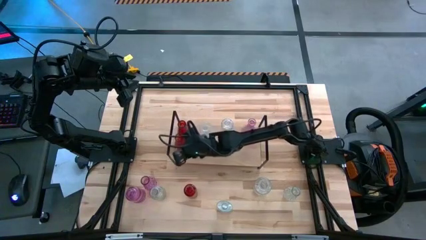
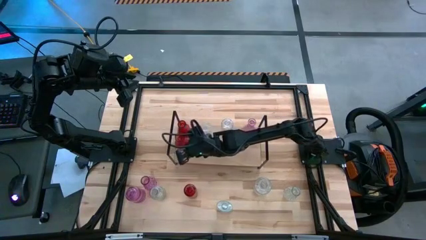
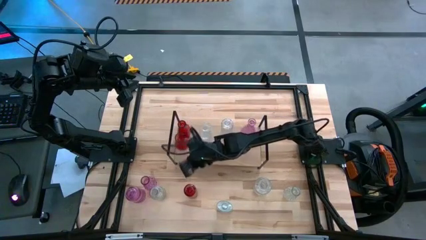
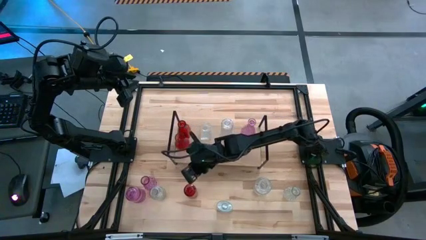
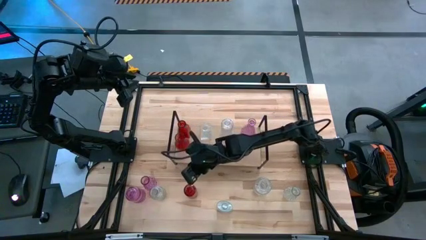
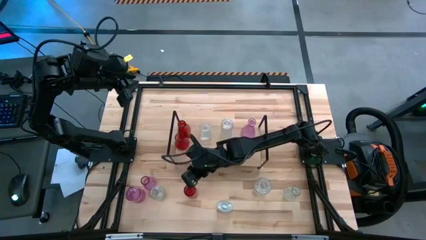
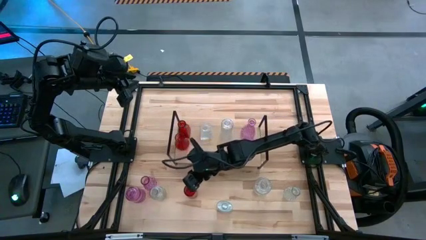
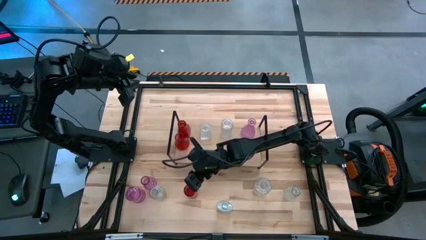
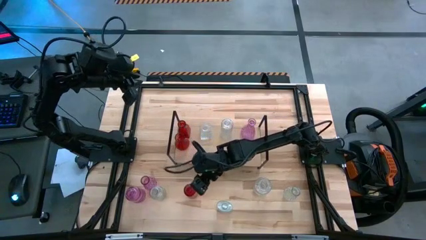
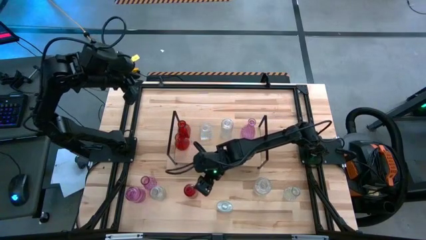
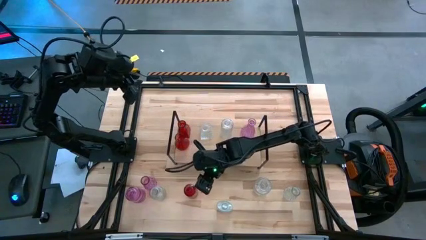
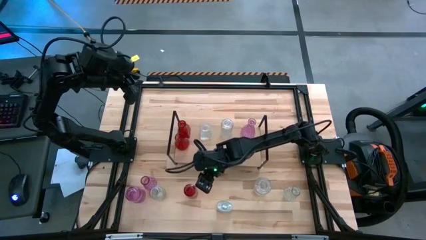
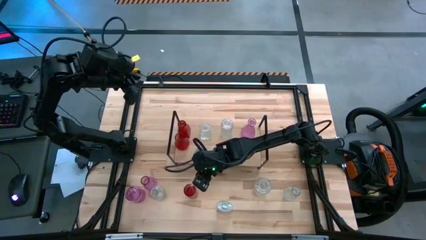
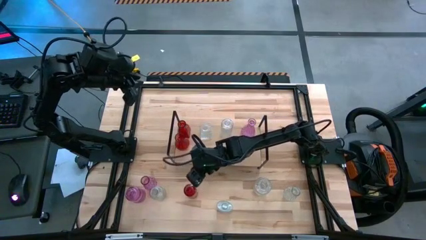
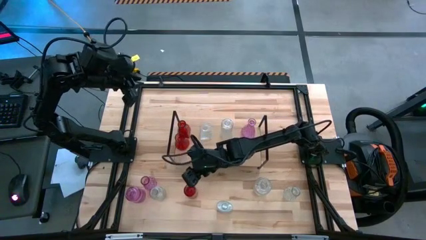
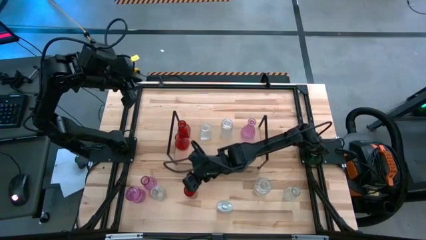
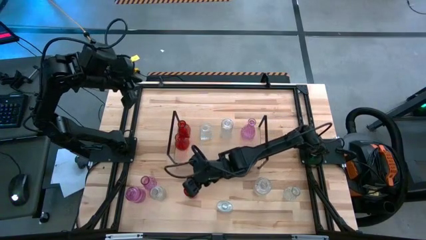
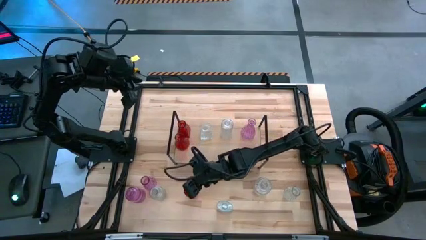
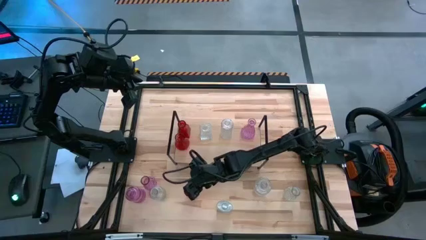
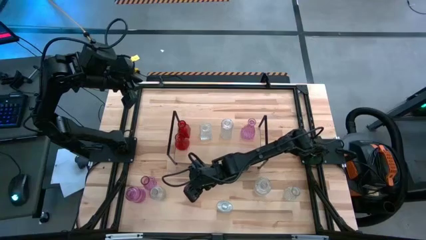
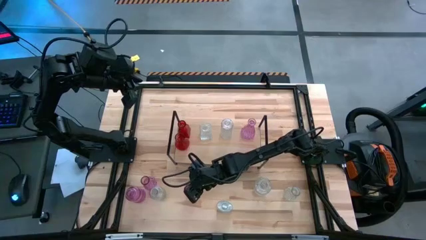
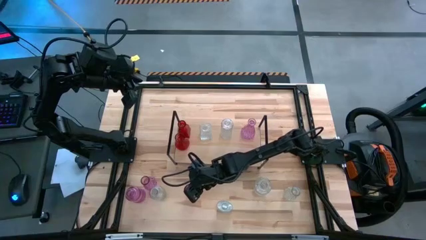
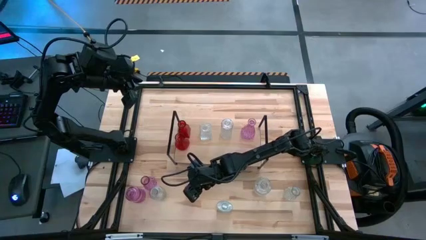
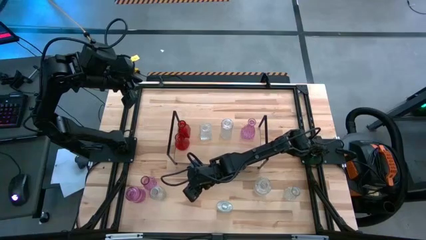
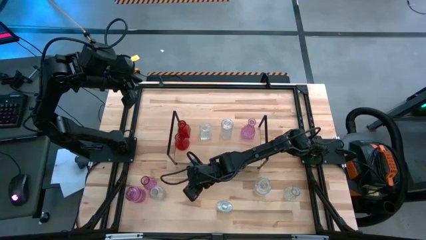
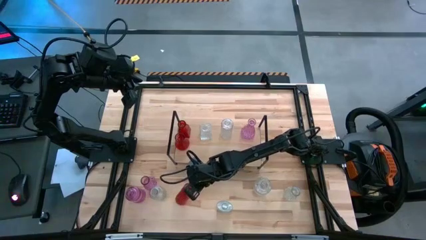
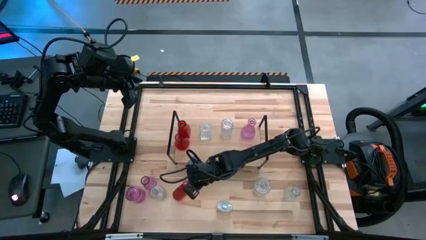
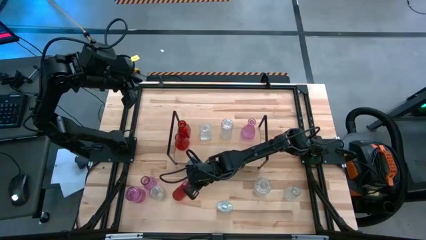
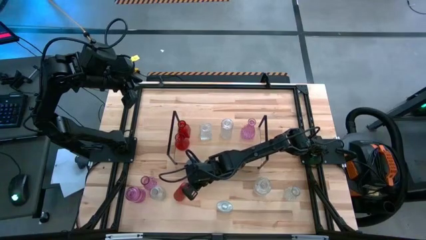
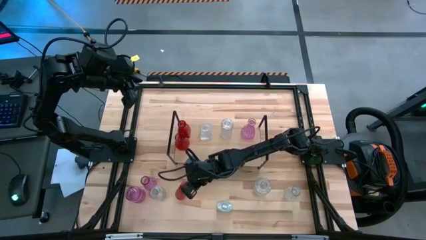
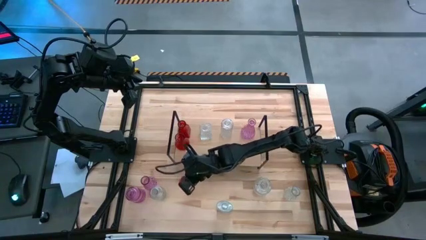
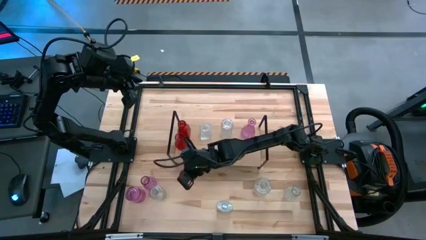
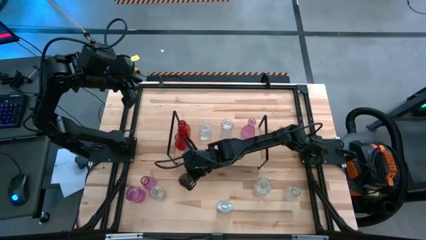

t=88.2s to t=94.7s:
Task: sort vases onto shelf
Put the red vase aligned with the other red vase on the shelf

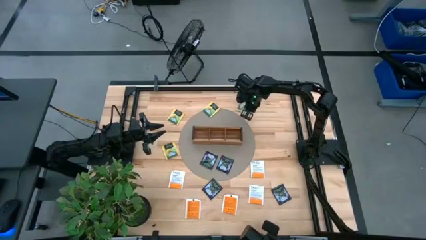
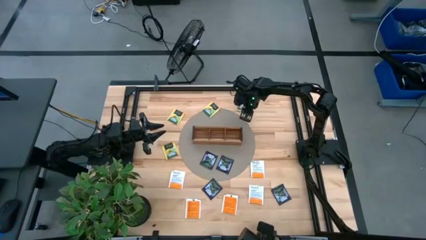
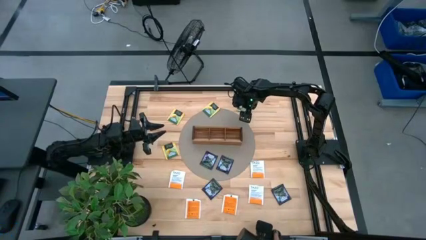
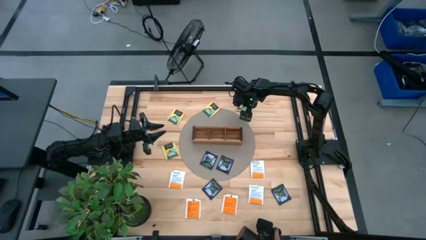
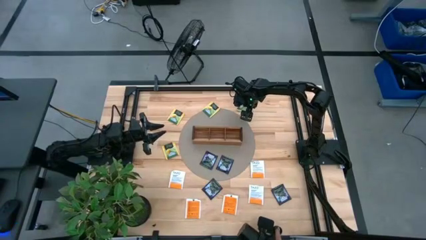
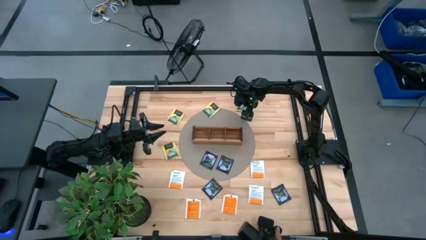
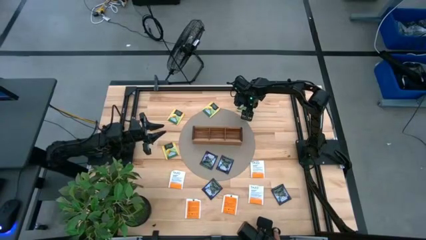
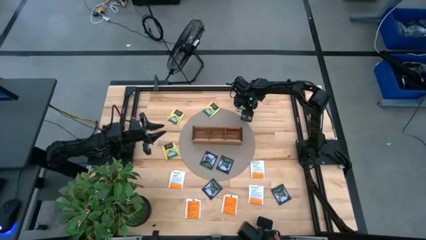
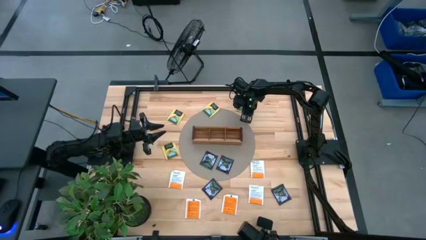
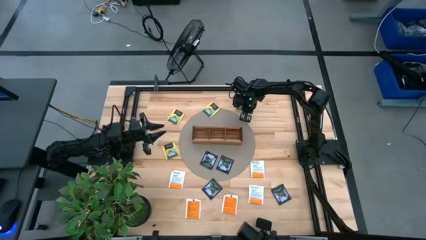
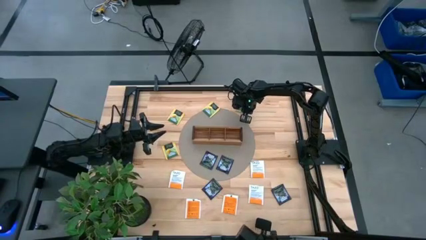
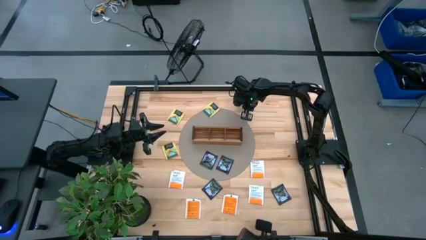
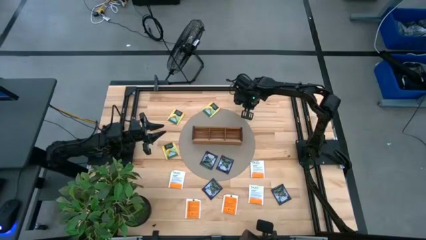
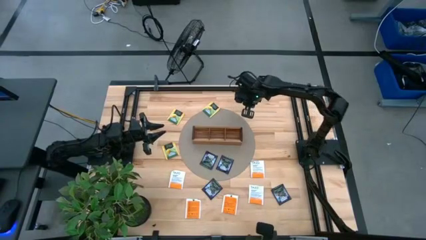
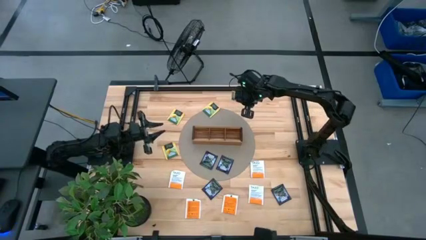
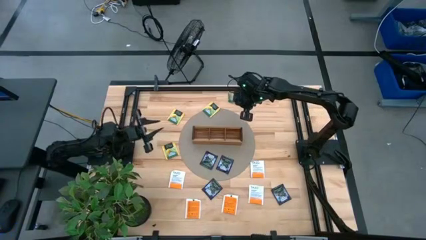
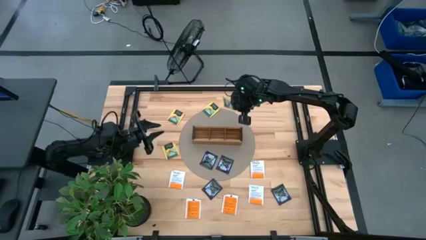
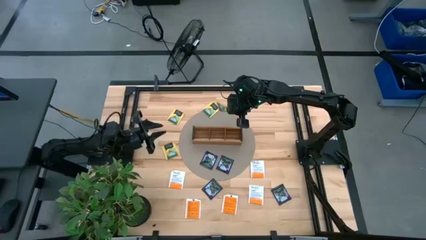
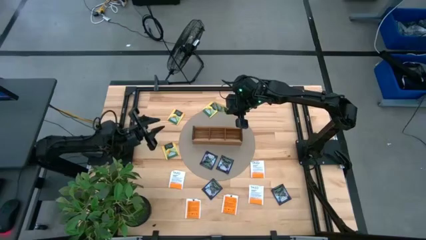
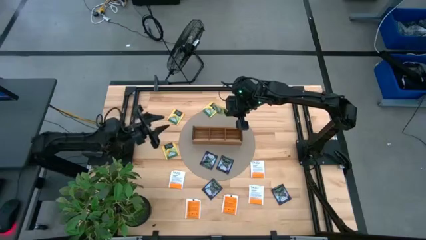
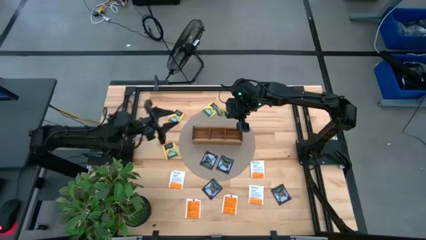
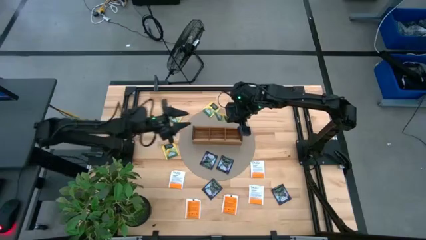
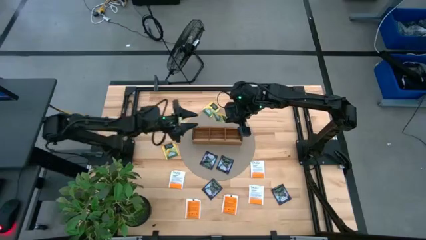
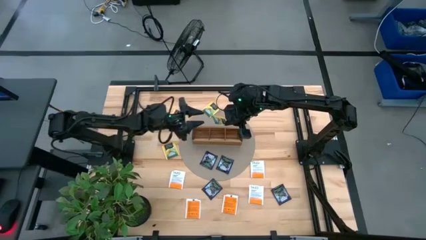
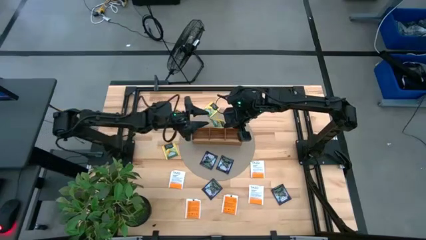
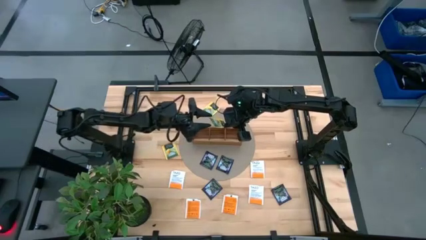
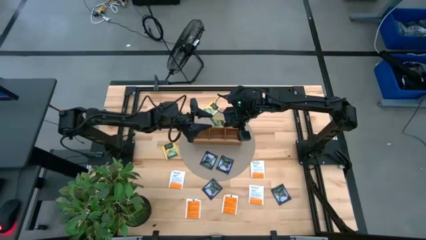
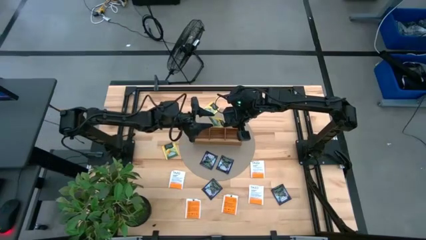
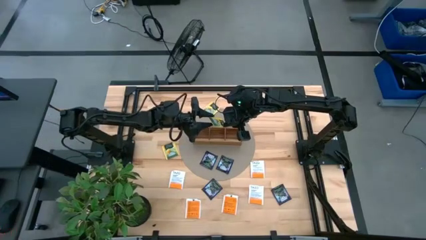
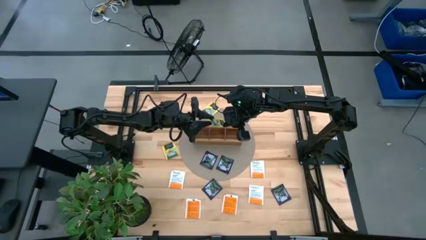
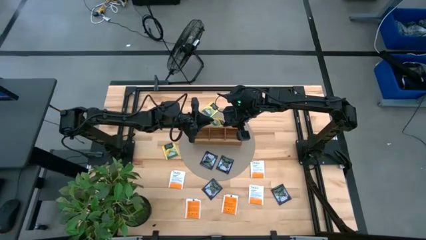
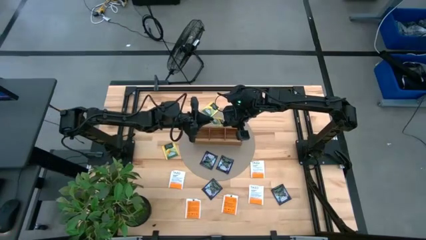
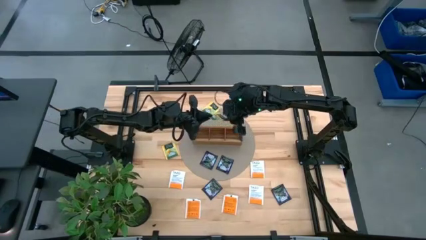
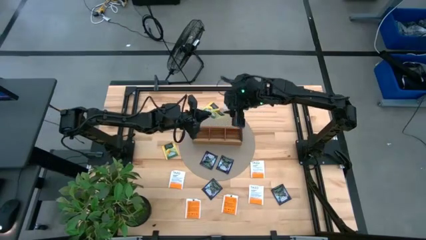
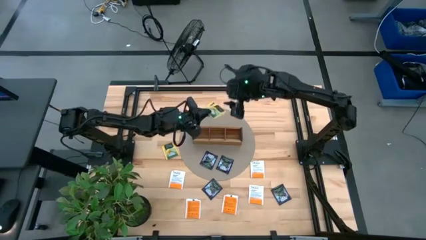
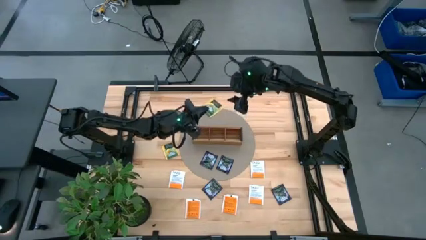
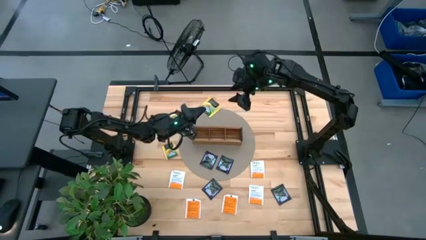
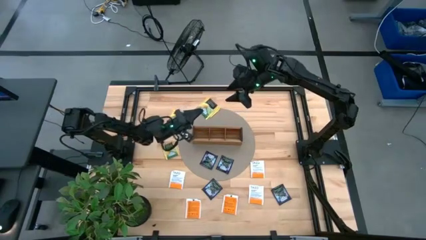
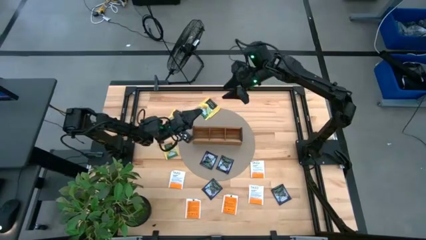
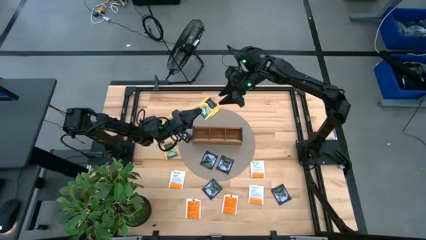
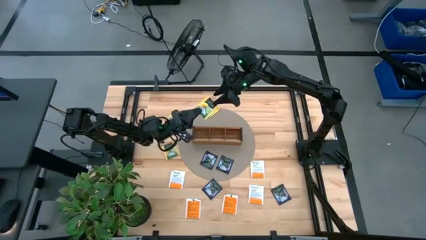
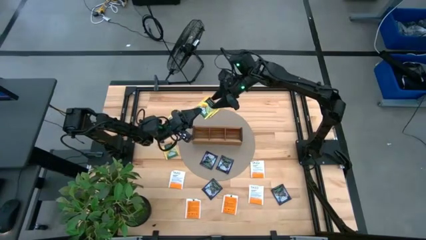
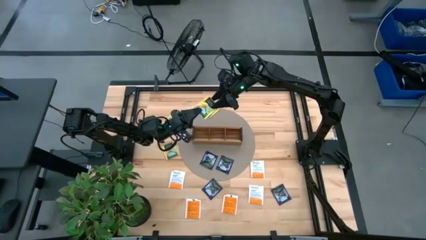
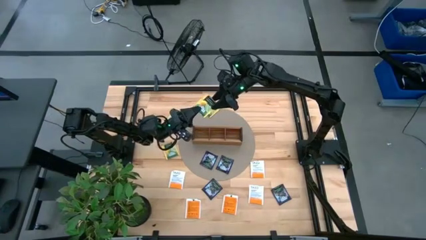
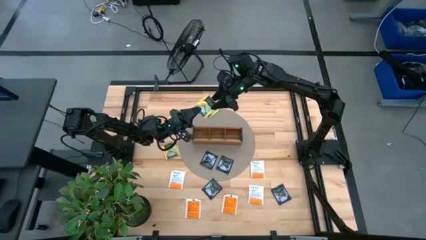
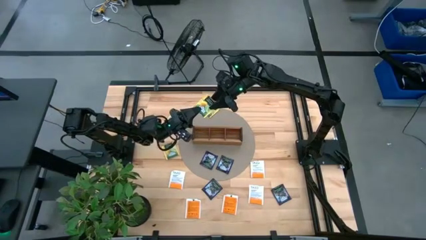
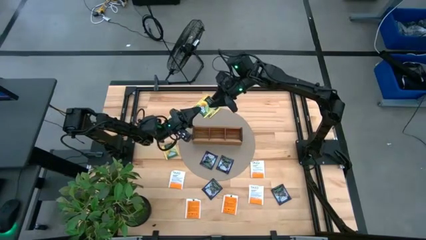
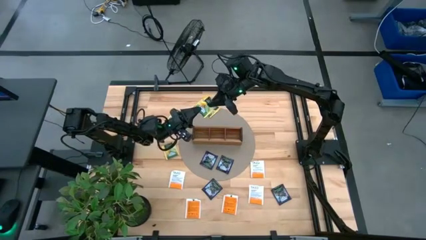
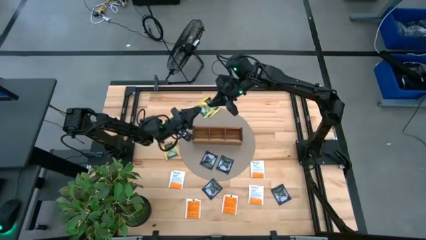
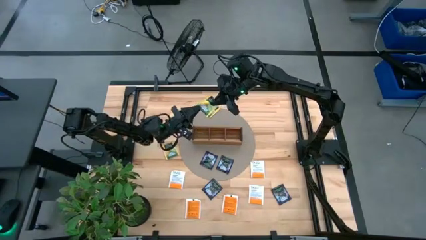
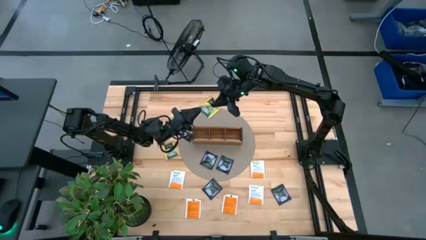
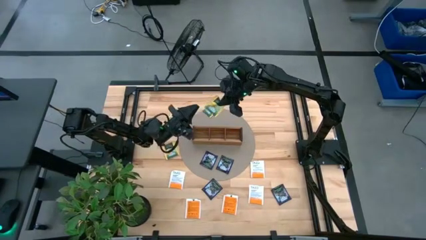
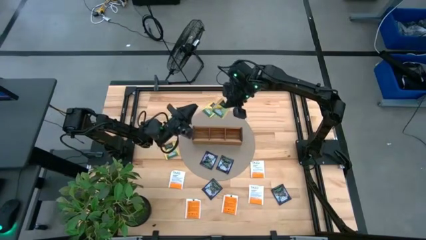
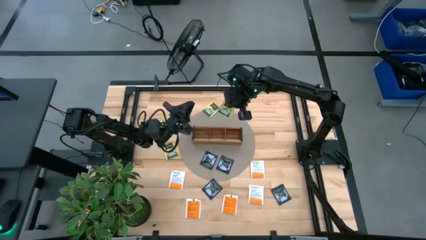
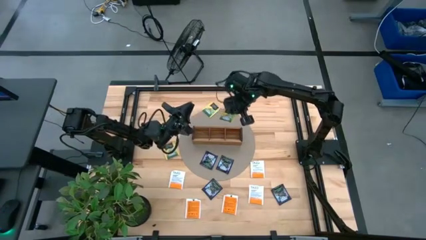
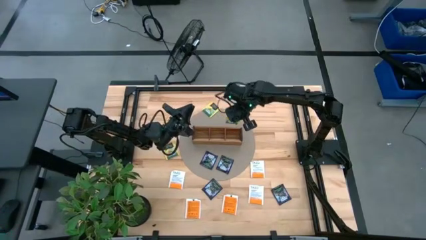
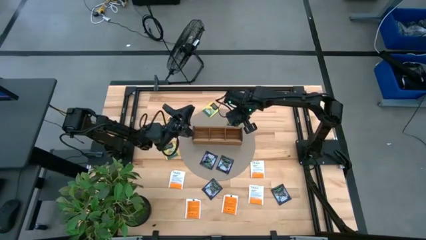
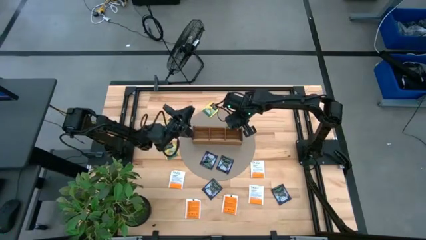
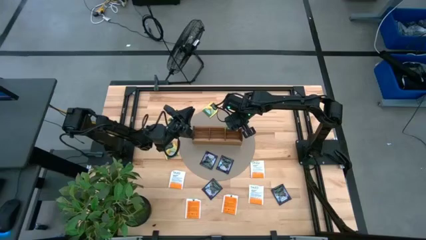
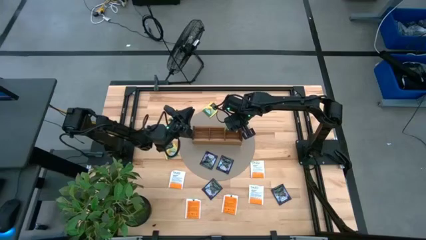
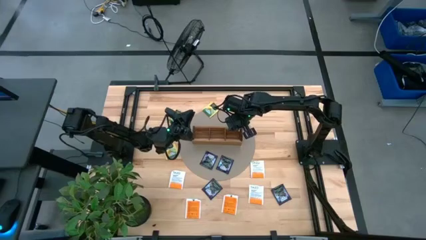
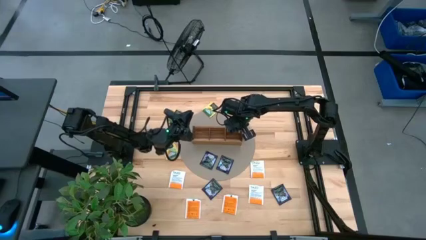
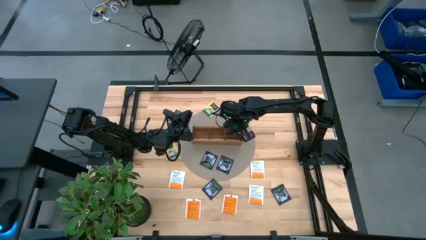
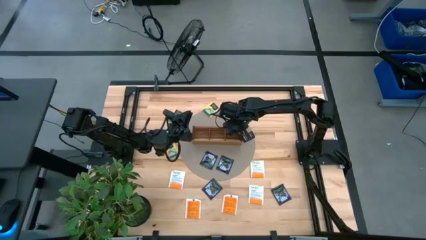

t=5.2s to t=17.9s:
Task: Pick & Place Tea
Put the yellow tea bag into the right section of the wooden organizer
